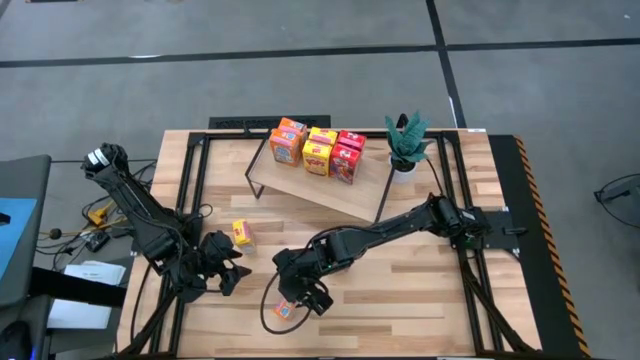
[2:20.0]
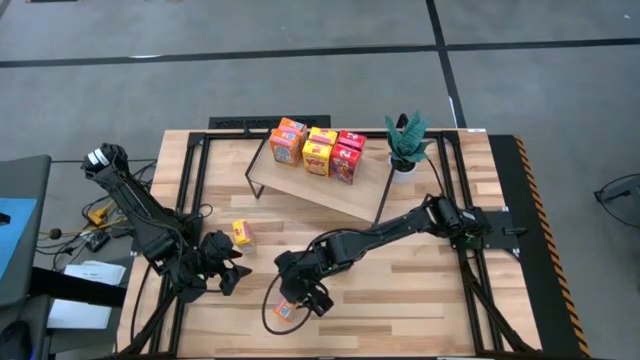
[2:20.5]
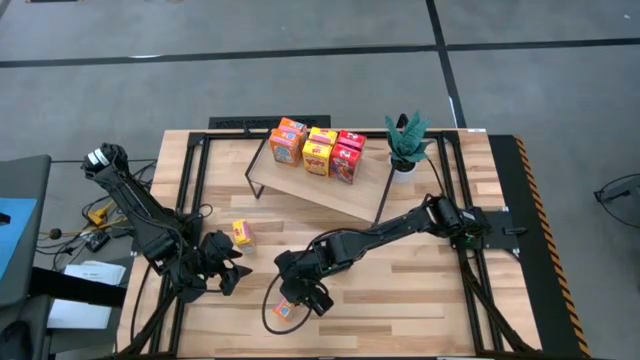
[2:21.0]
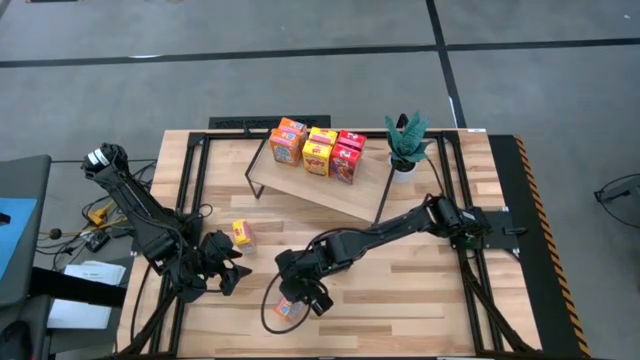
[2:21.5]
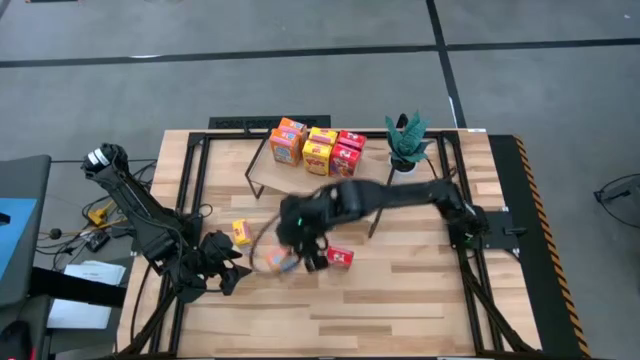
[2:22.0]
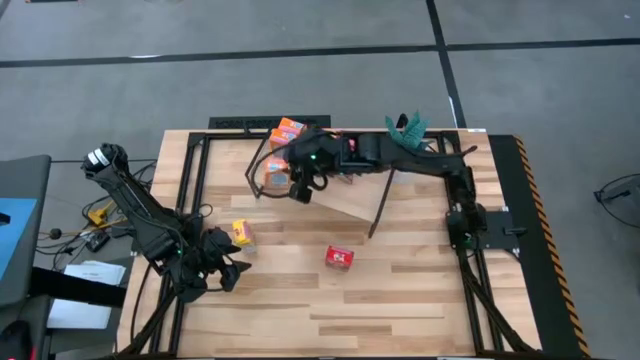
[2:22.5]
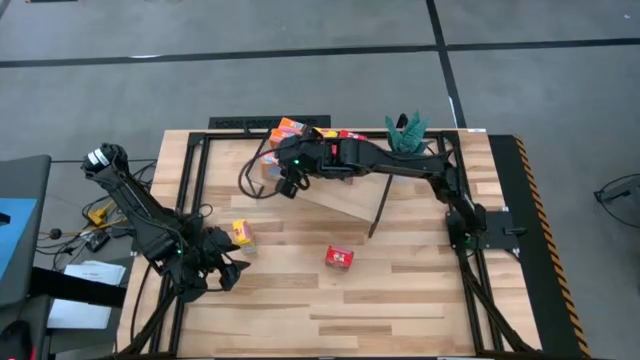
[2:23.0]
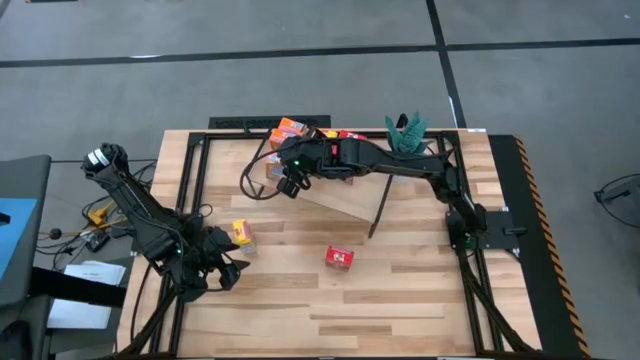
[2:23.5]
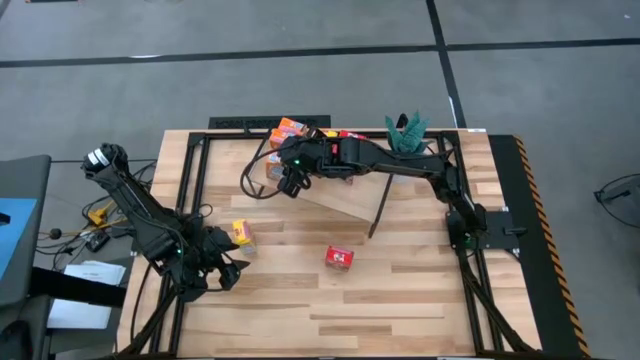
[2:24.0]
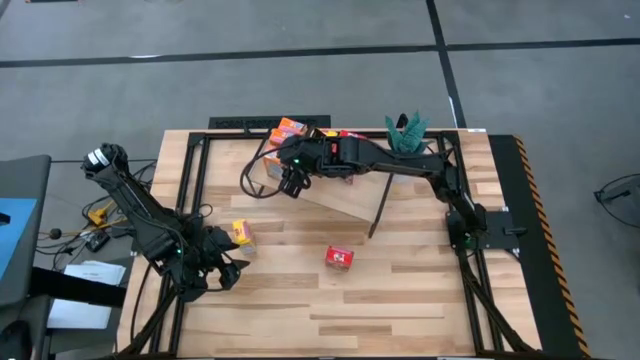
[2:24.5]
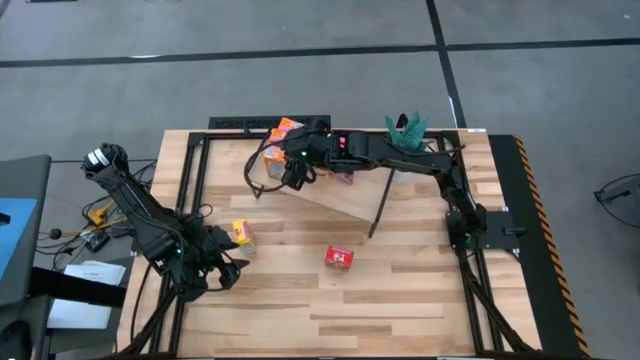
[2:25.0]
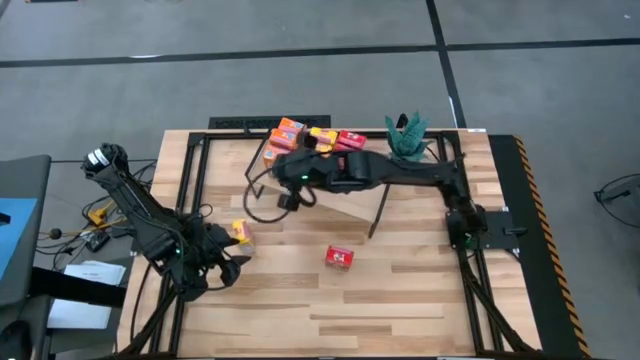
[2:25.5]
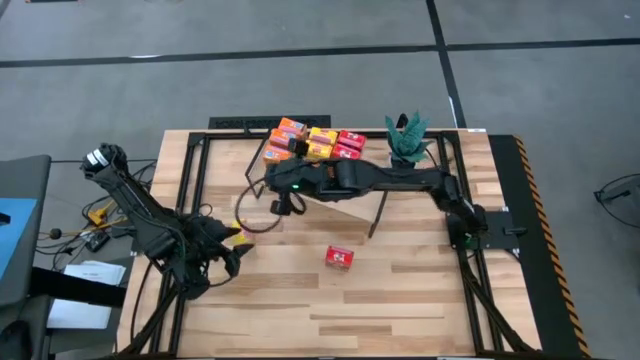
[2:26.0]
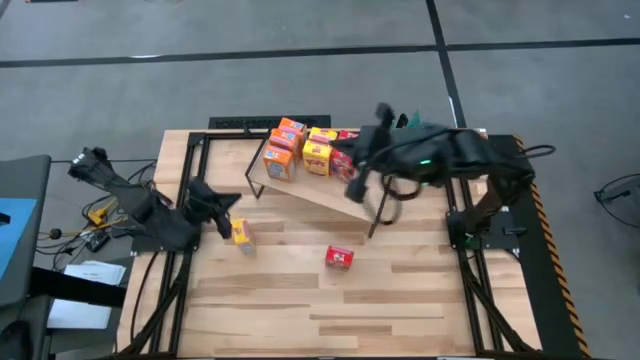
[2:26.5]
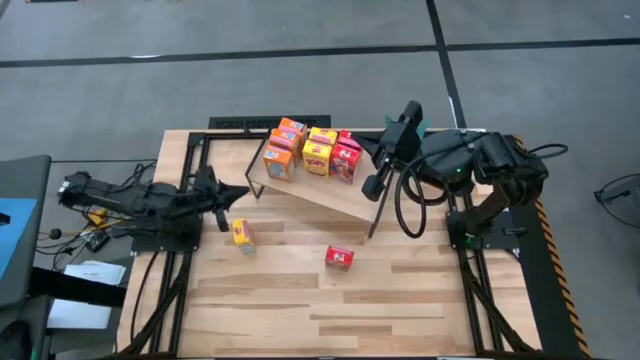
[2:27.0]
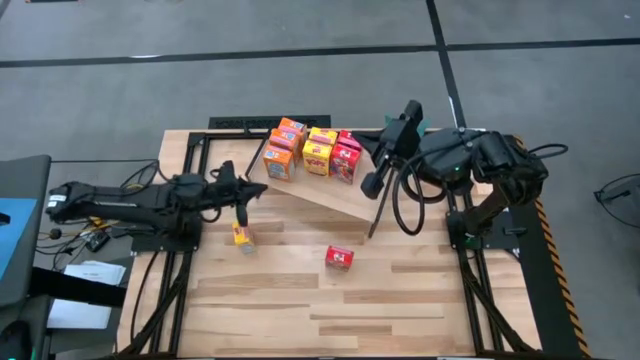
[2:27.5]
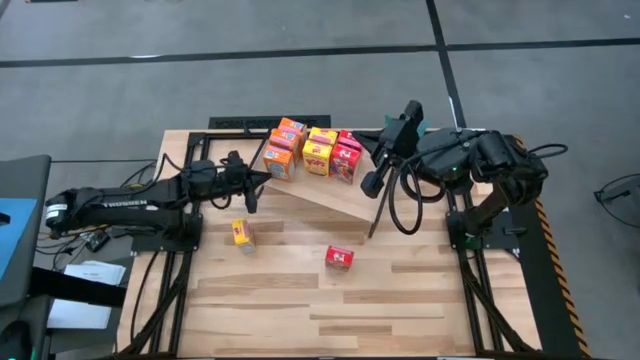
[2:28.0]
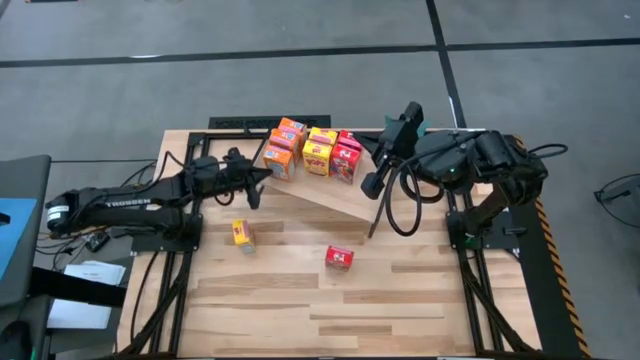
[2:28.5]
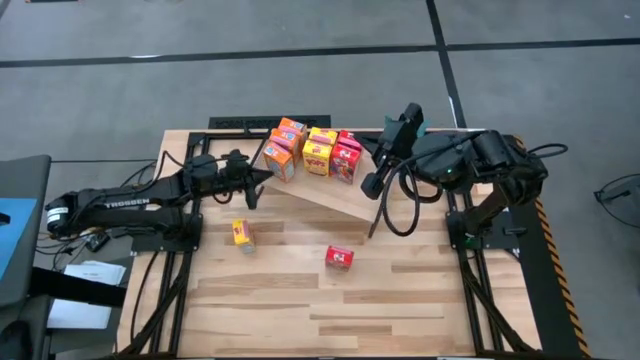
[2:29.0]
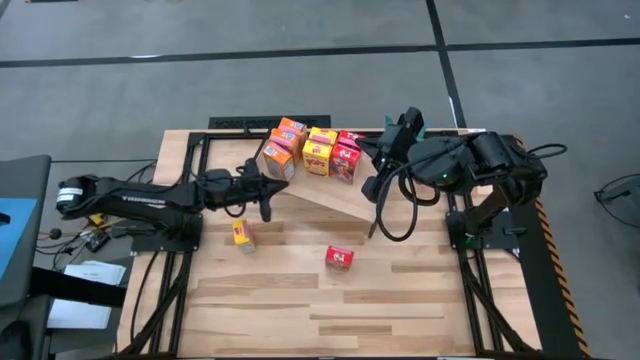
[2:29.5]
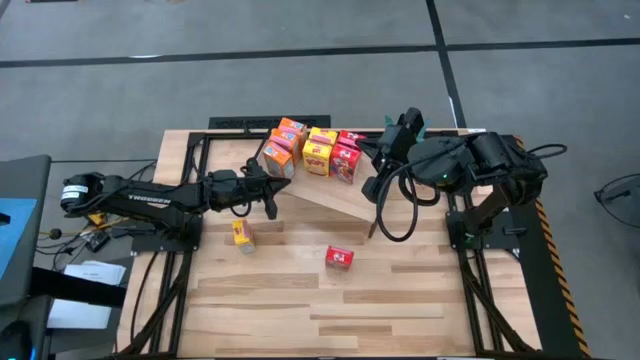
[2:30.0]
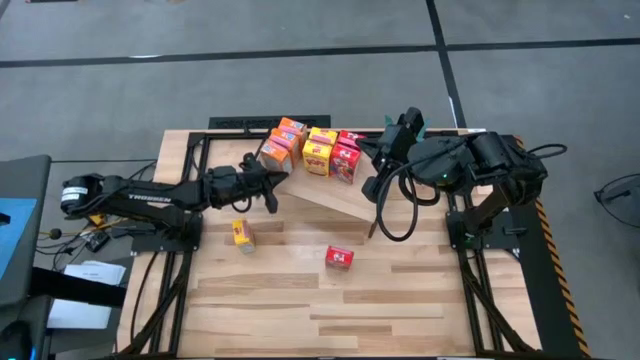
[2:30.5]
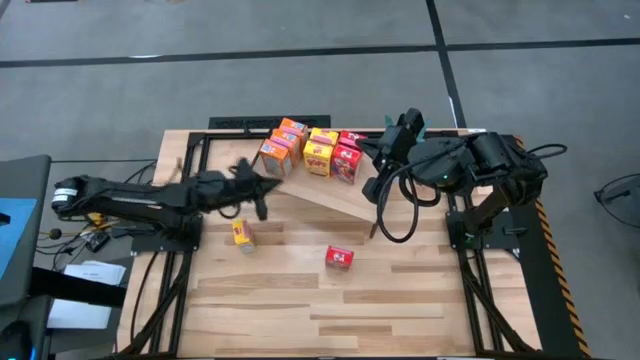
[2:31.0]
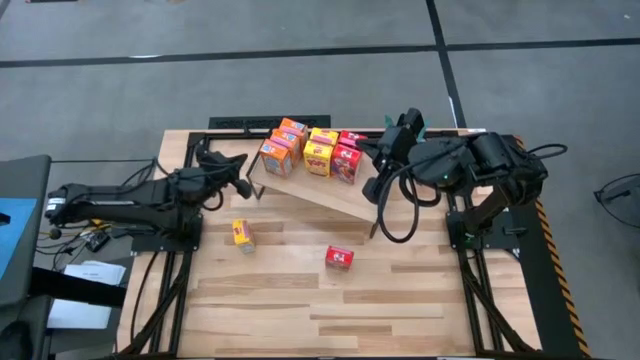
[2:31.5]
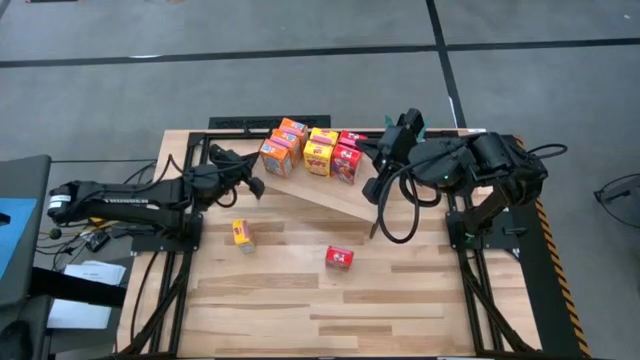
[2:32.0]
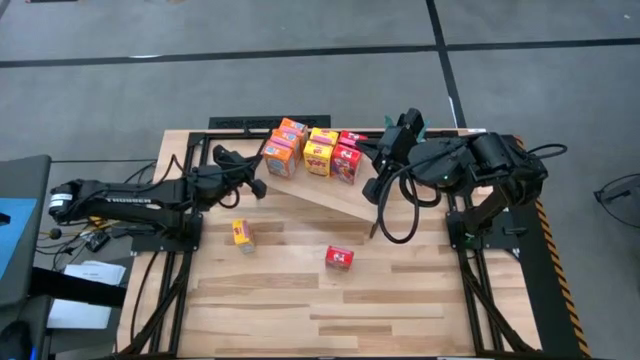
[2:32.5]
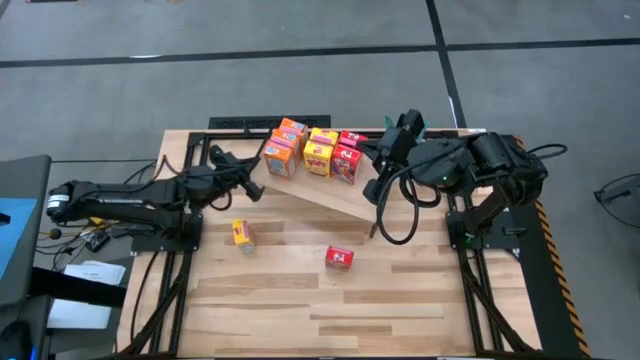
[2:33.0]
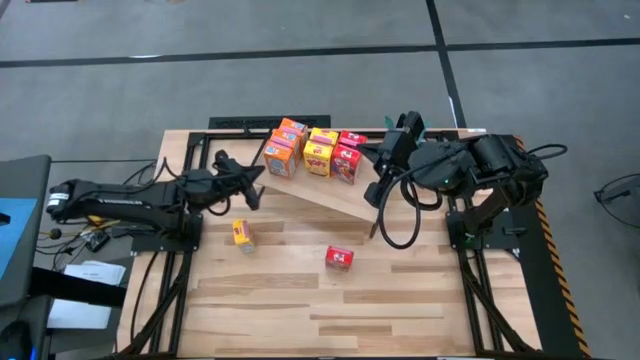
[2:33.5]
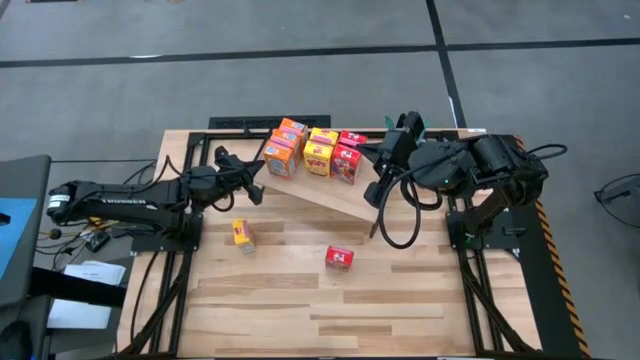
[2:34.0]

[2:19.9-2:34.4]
Task: Stack cereal on shelf
Put the orange cereal box aligned with the other orange cereal box on the shelf

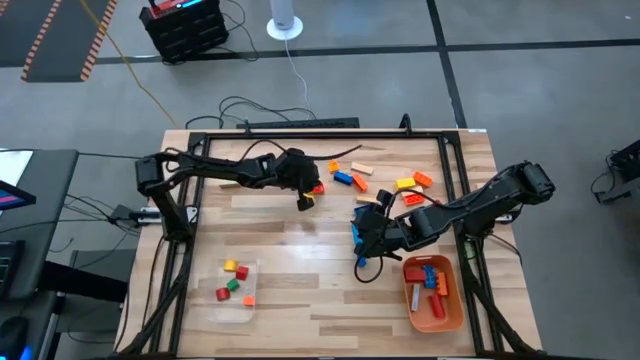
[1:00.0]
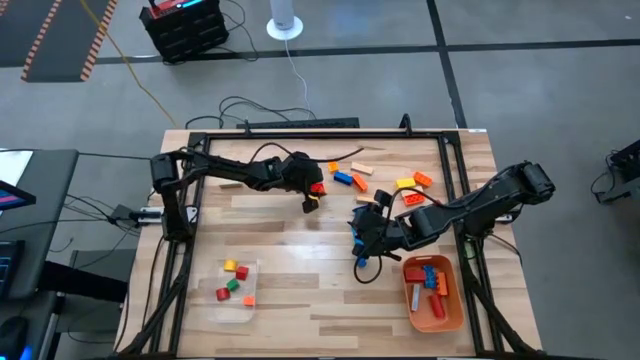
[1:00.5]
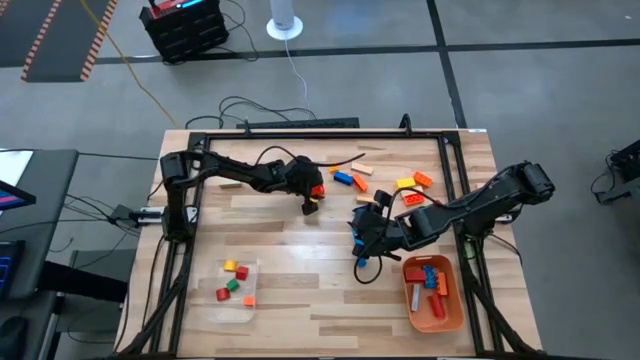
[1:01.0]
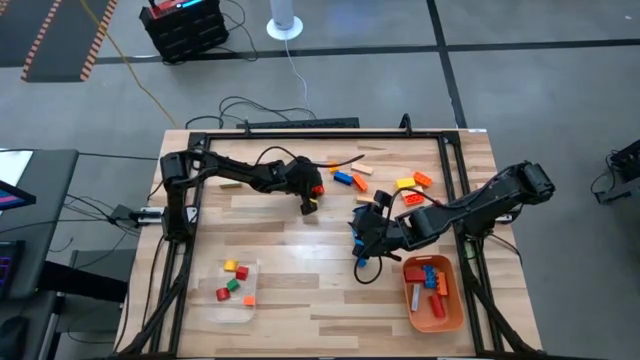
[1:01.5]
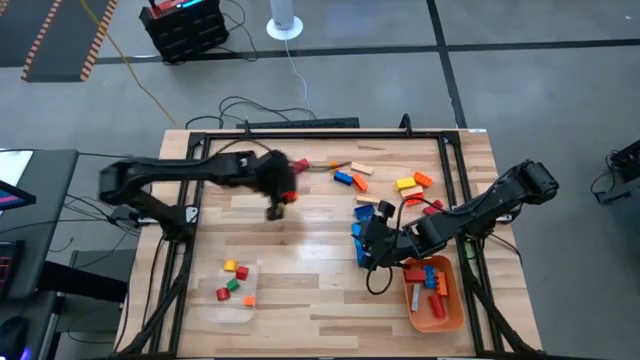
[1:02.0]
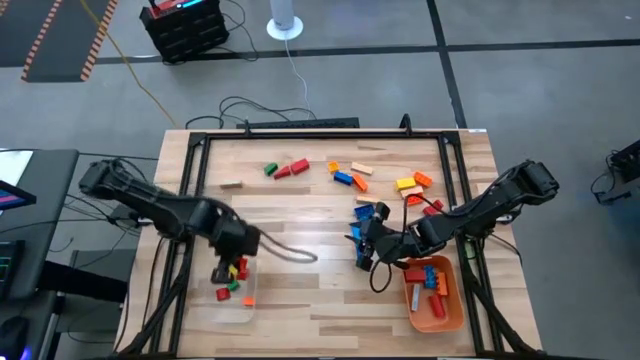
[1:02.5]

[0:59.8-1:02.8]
Task: Sort blocks by size
Put the small orange game piece into the transparent bin

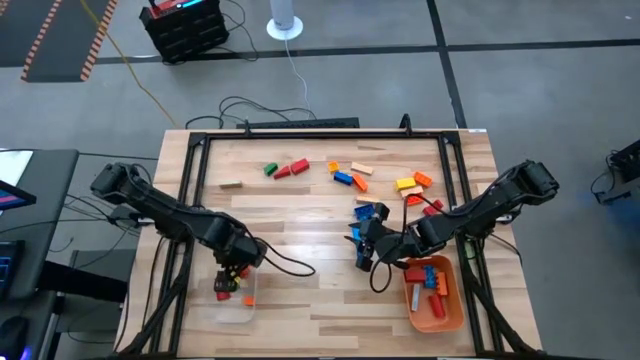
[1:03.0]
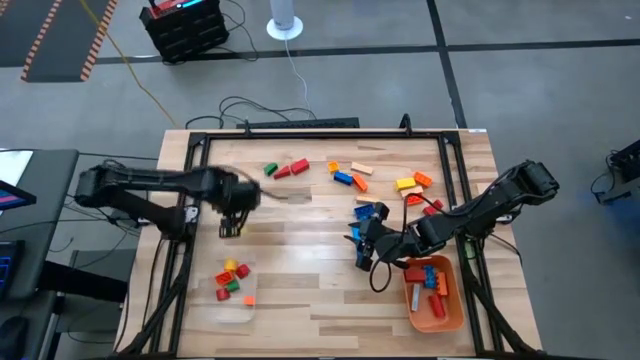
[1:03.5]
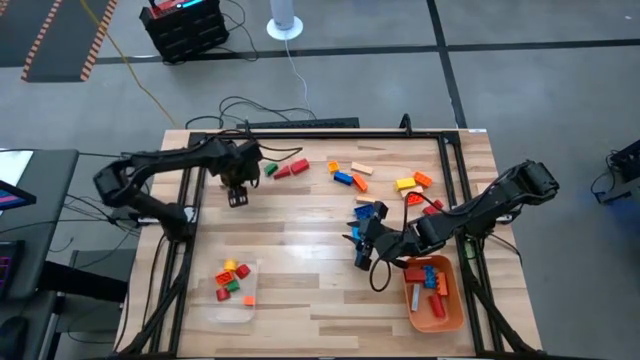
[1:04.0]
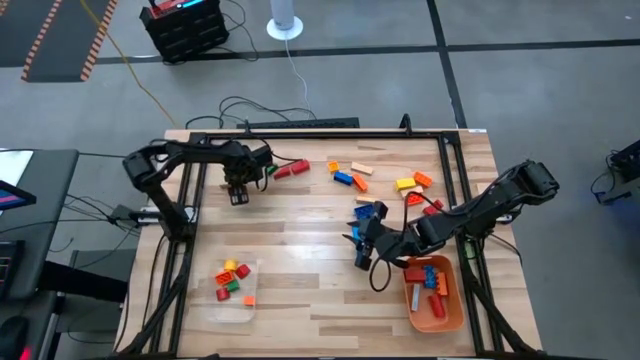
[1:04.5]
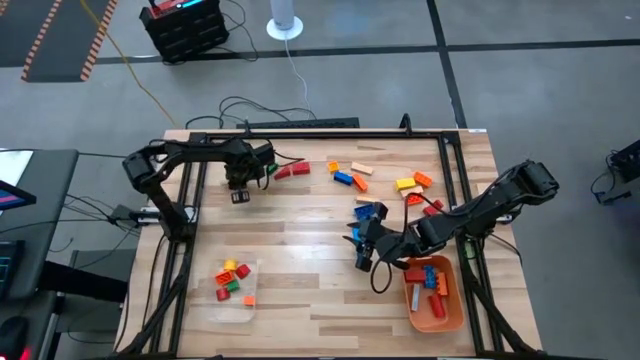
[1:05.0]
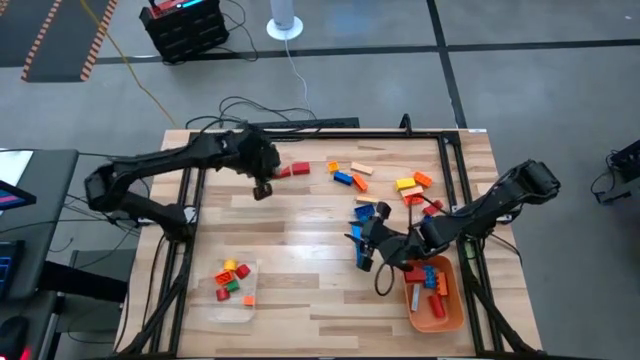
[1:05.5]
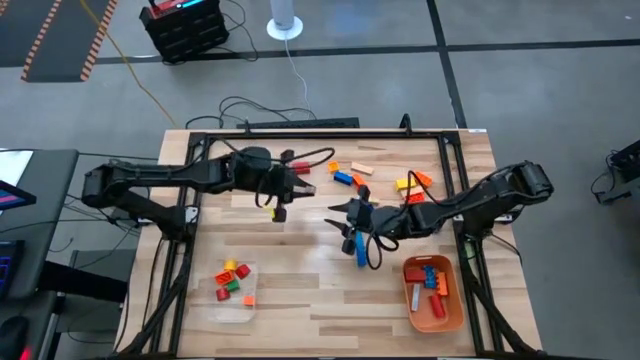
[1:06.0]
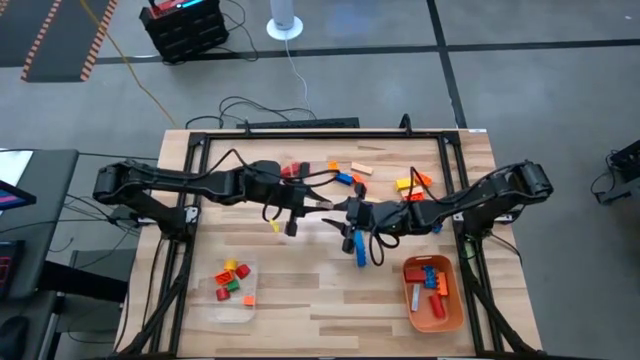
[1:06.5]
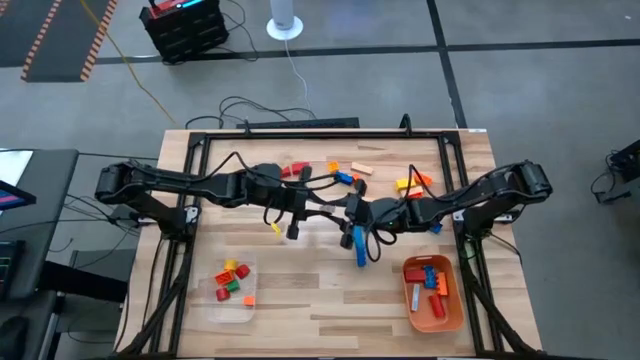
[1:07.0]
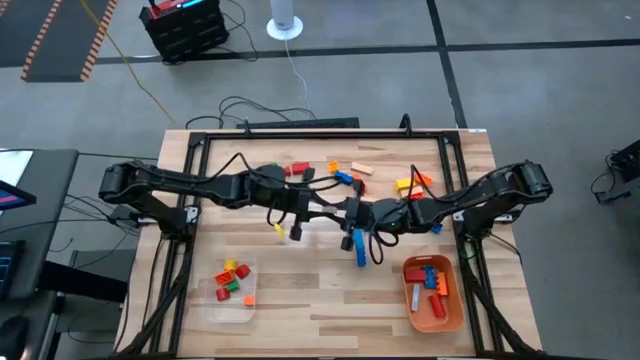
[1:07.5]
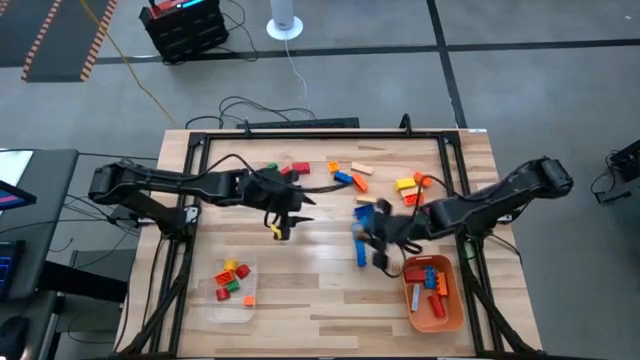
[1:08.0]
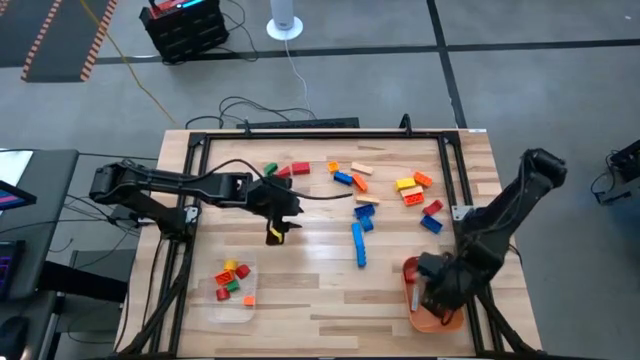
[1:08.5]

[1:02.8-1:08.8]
Put the large brown block into the orange bin
